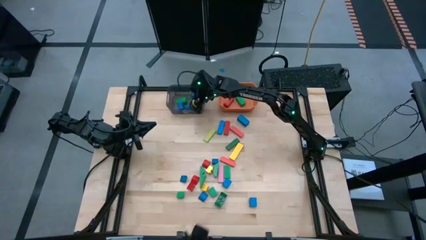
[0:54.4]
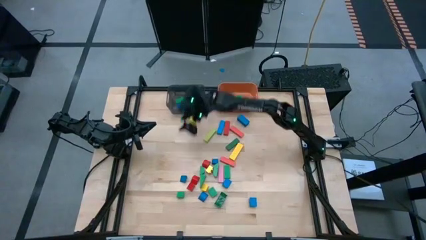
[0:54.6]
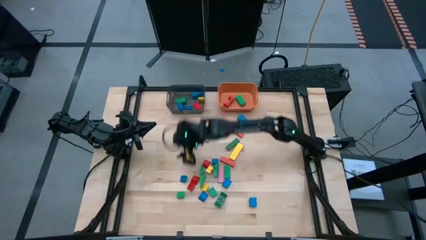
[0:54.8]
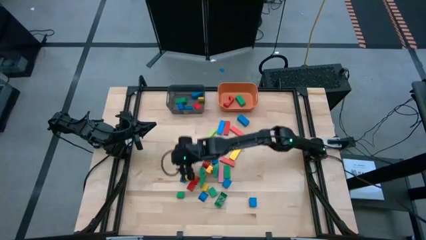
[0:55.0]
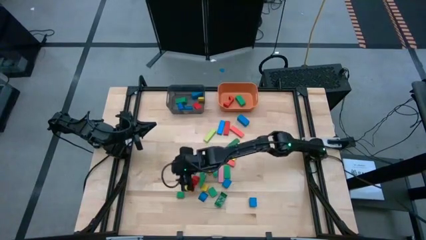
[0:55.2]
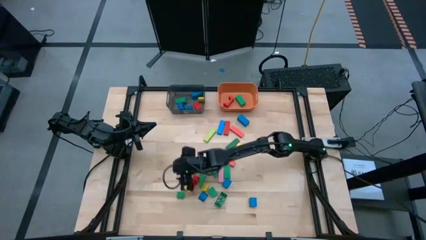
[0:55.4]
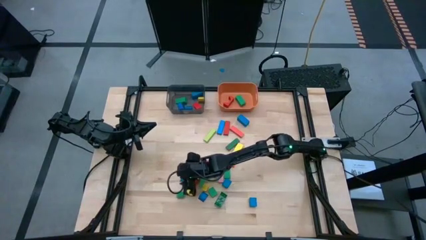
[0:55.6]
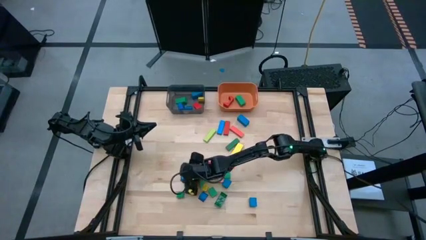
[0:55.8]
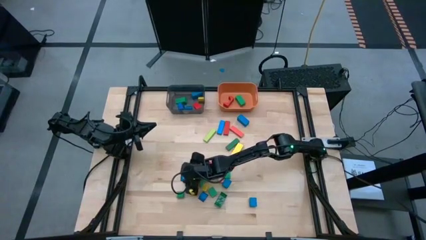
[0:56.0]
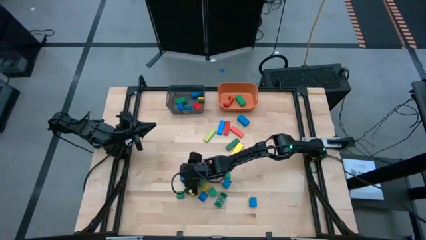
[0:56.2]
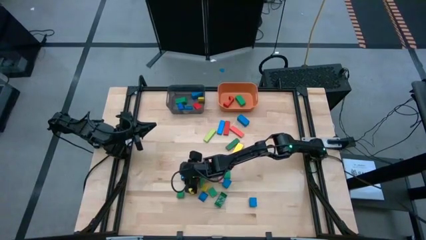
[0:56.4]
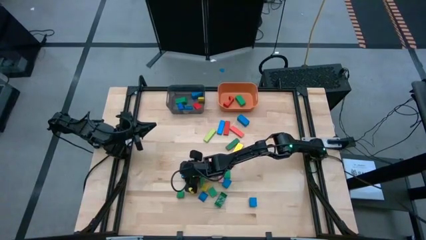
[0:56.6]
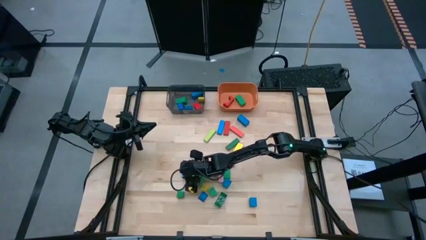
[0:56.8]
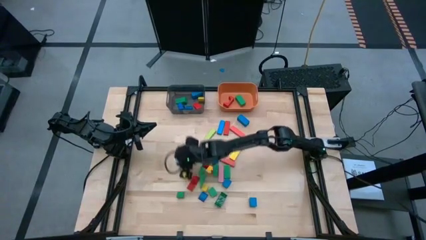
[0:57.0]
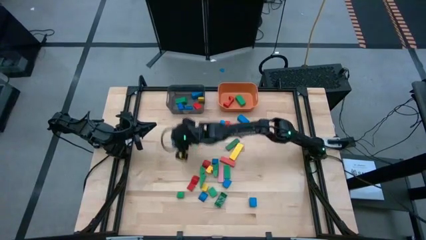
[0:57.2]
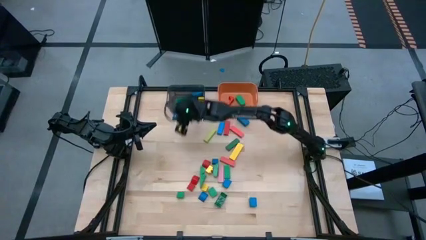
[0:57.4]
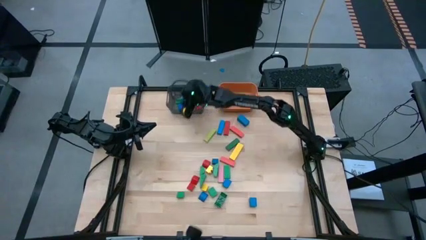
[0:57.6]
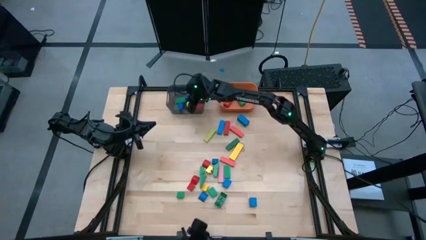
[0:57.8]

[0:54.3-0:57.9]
Task: Sort blocks by size
Put the small blue block into the black bin

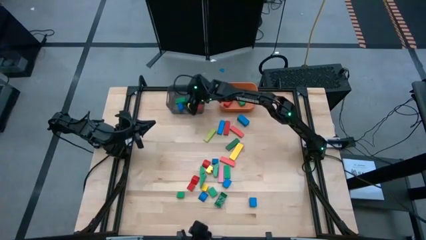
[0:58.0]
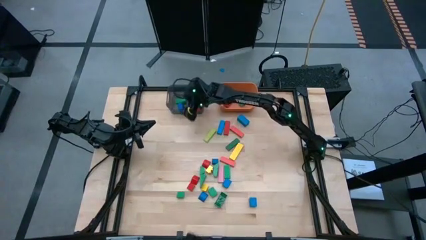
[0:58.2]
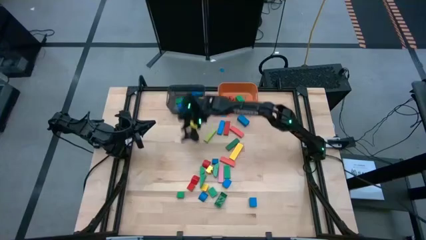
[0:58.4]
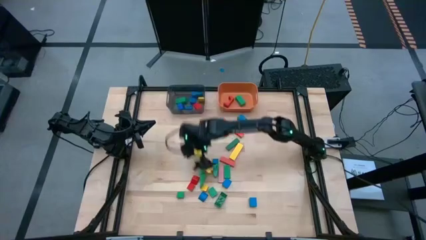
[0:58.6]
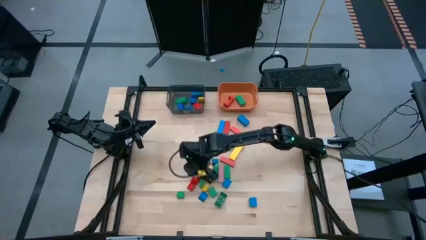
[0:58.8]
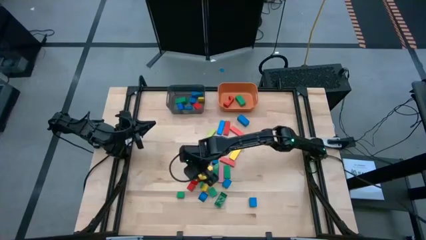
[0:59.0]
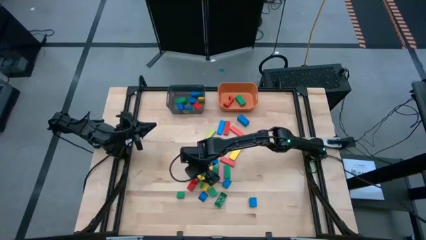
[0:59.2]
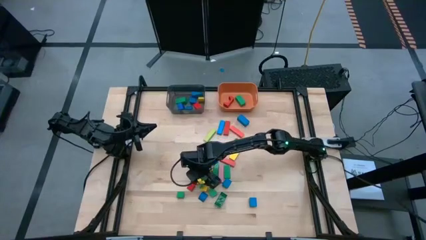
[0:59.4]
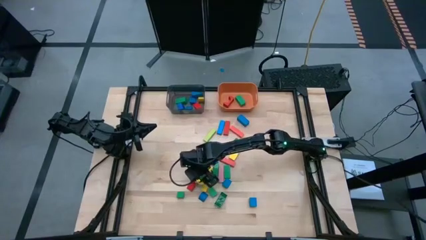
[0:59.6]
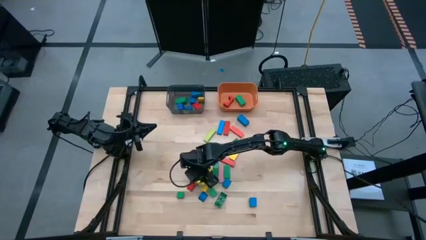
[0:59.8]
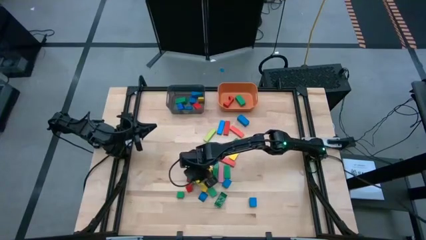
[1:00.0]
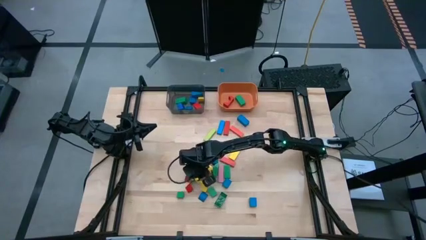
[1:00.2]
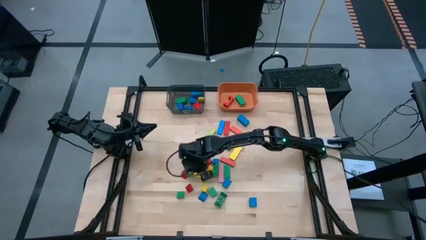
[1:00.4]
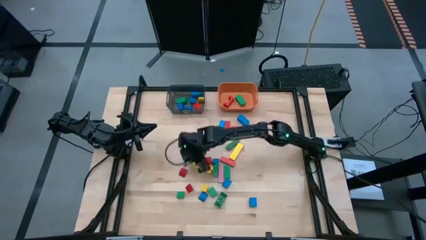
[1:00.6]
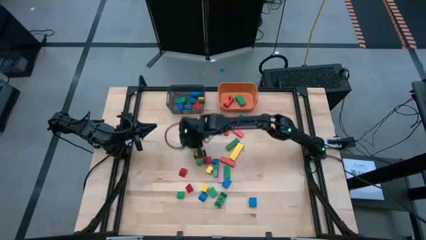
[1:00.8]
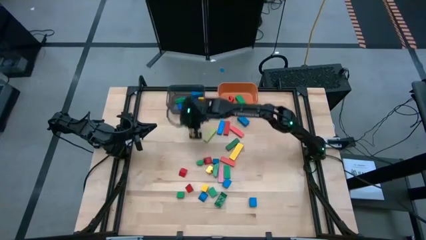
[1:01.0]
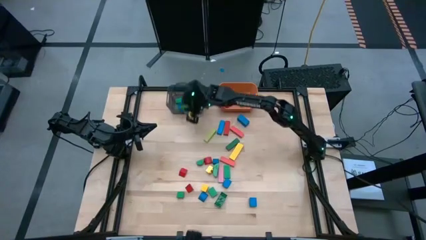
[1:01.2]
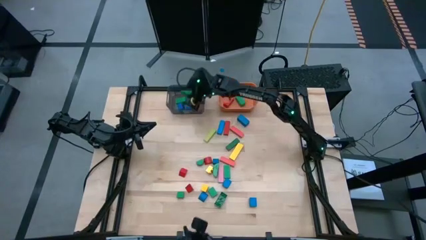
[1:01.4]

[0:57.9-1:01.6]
Put the small green block into the black bin

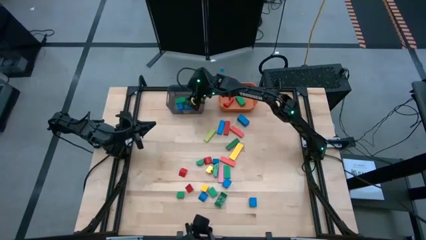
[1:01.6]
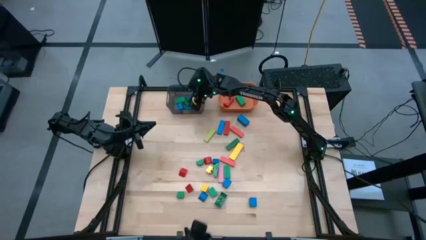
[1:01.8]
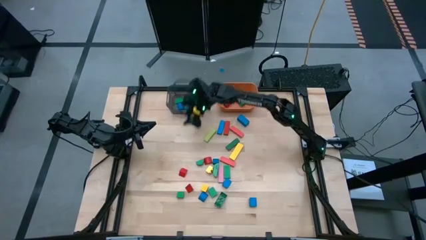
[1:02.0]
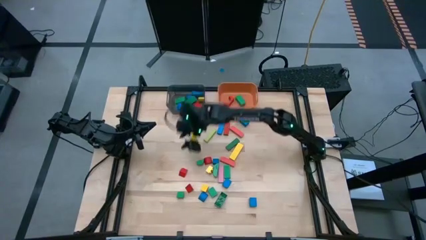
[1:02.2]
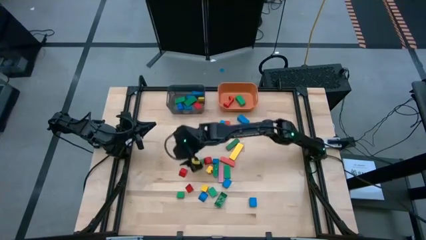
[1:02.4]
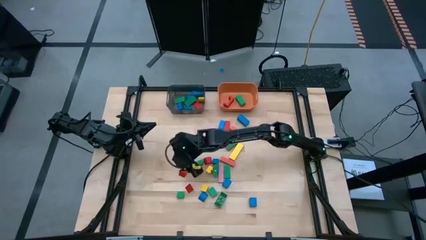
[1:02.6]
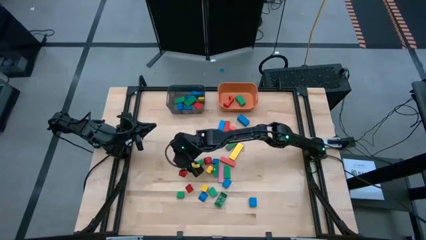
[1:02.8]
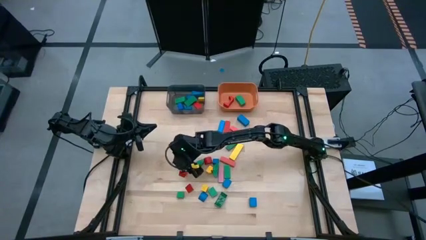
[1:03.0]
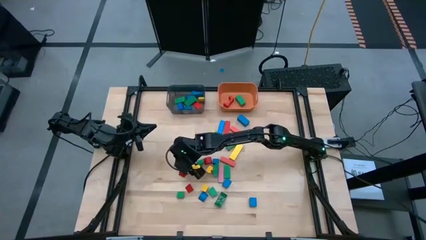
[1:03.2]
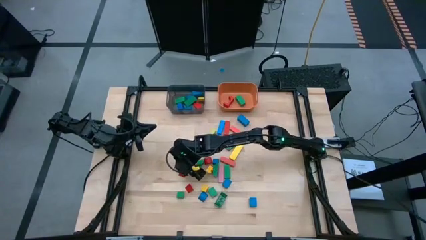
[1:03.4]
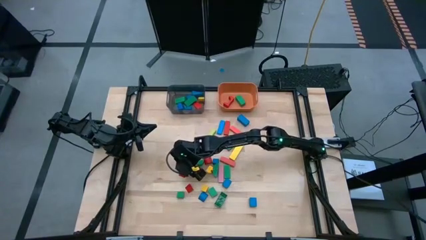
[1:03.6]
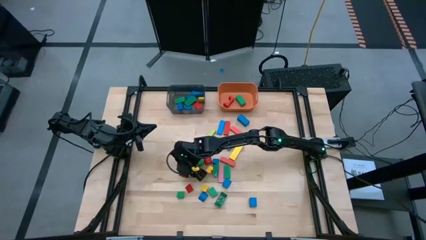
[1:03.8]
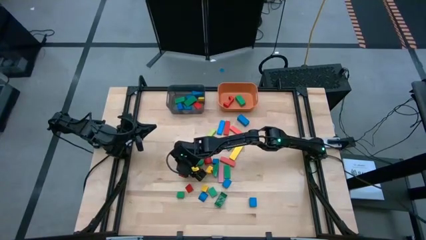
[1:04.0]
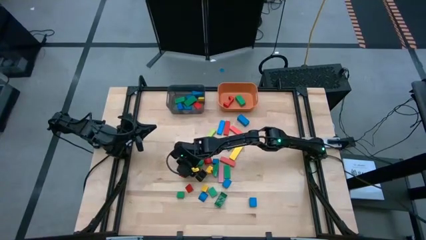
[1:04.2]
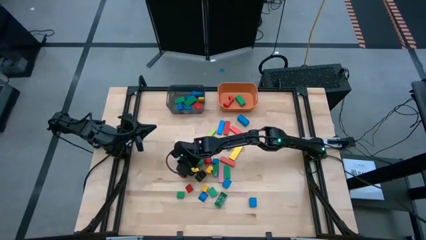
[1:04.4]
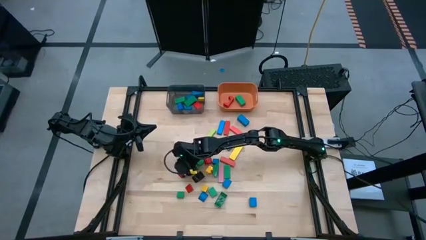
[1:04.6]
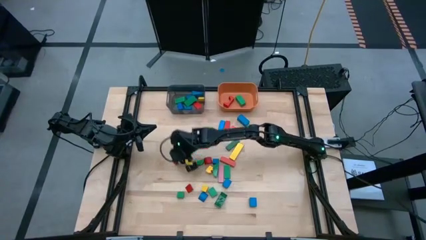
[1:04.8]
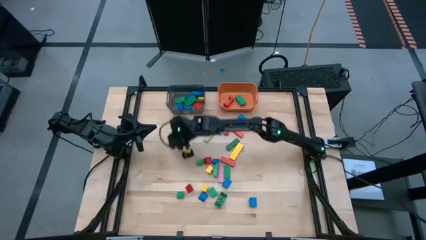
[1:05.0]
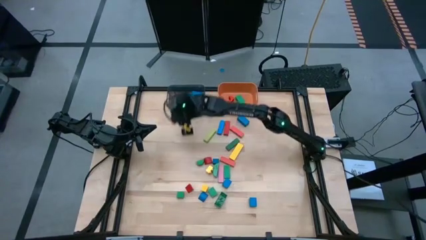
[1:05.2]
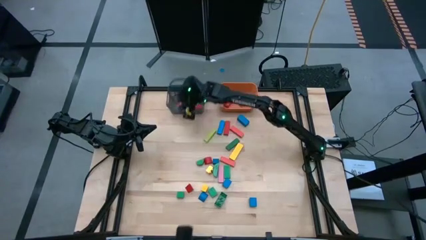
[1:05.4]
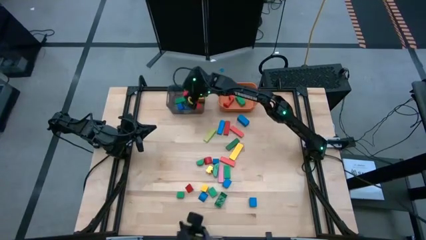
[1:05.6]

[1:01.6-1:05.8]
Put the small red block into the black bin

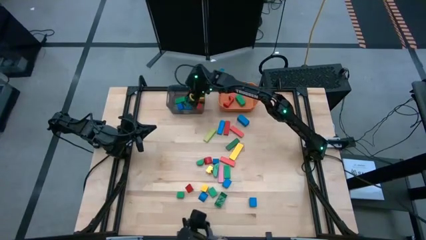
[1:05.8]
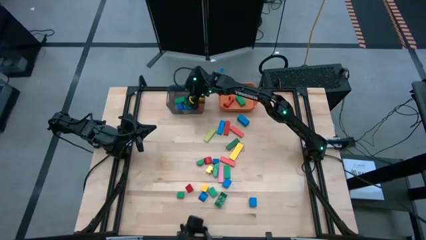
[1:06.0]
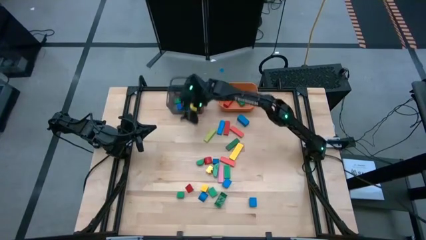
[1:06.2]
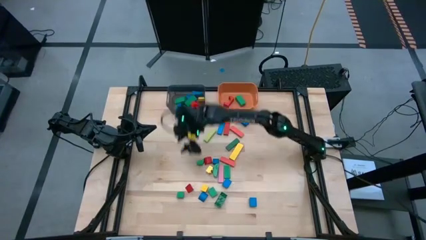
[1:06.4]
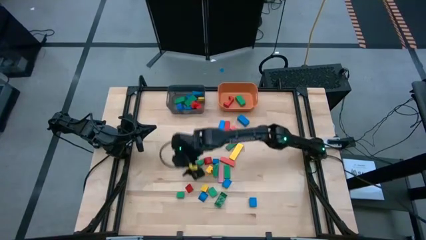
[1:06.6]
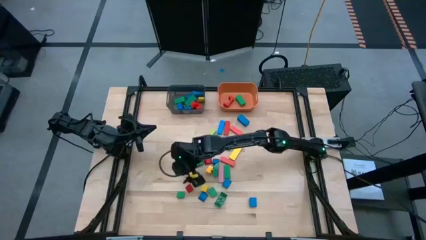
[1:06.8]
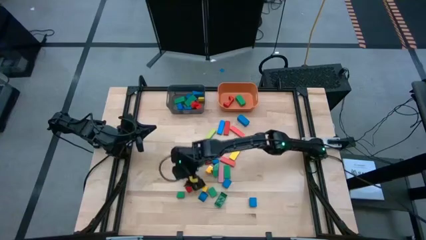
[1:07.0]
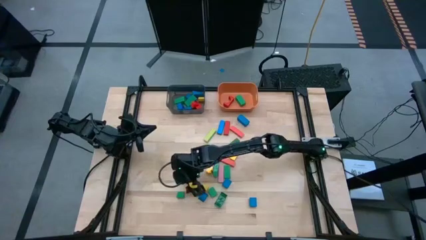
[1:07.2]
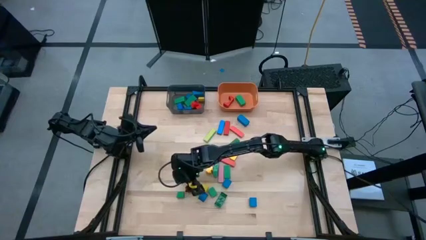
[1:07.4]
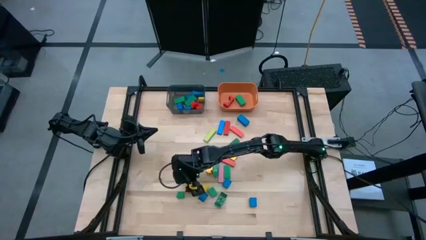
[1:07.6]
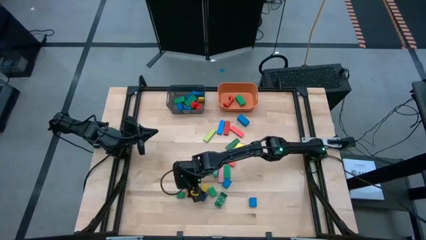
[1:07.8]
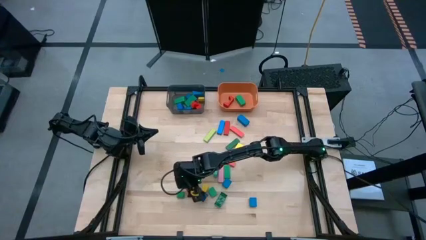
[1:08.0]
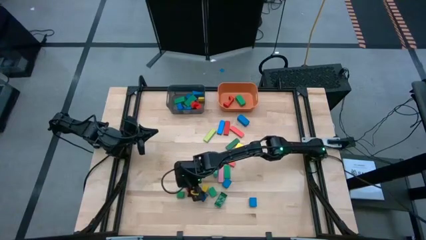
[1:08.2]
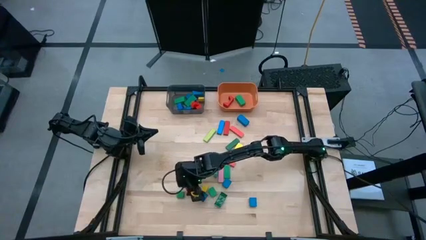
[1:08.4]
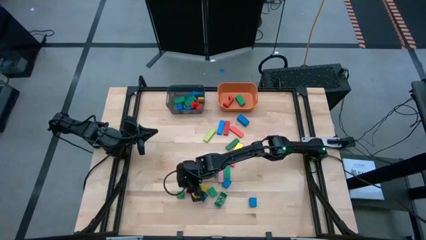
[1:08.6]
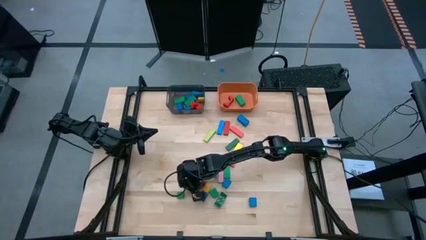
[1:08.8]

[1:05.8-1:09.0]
Put the small red block into the black bin

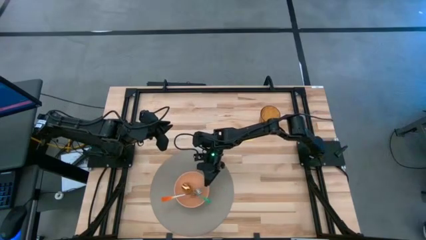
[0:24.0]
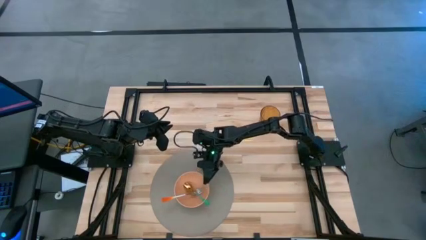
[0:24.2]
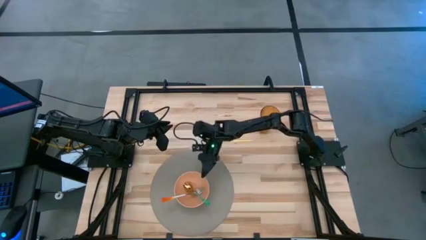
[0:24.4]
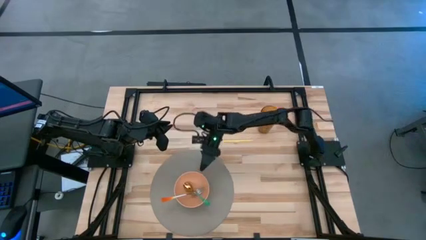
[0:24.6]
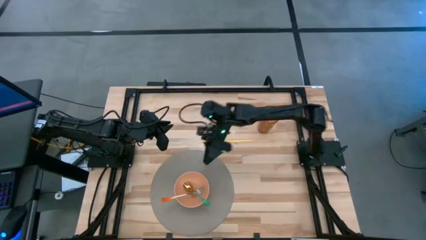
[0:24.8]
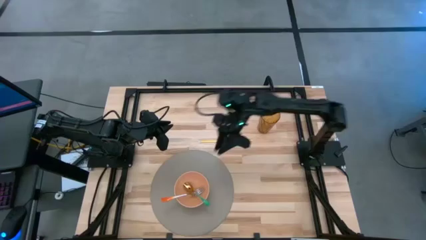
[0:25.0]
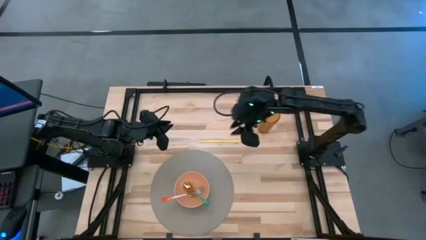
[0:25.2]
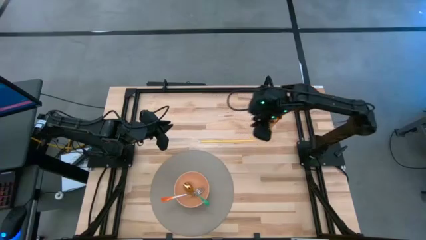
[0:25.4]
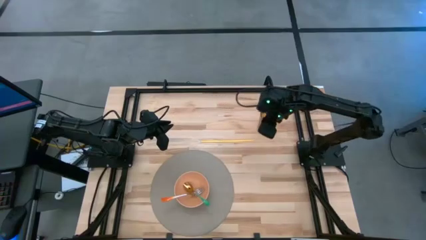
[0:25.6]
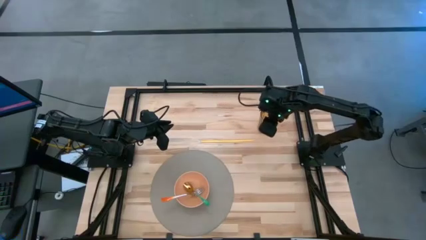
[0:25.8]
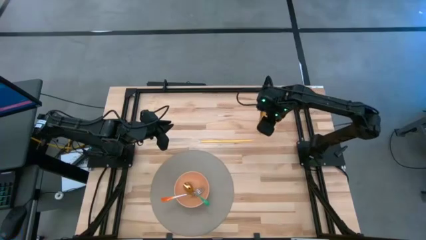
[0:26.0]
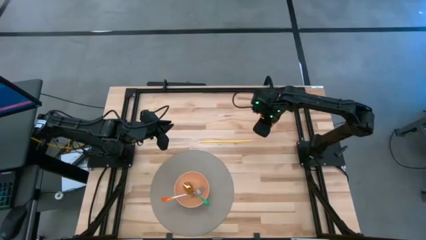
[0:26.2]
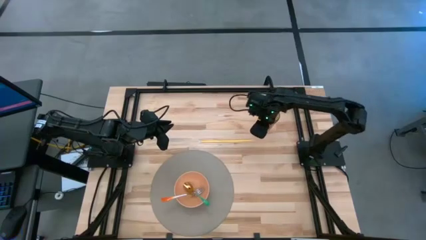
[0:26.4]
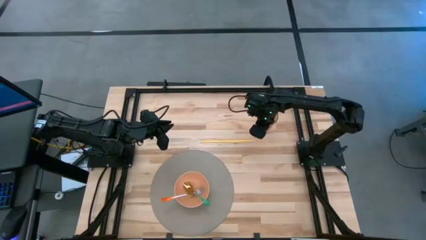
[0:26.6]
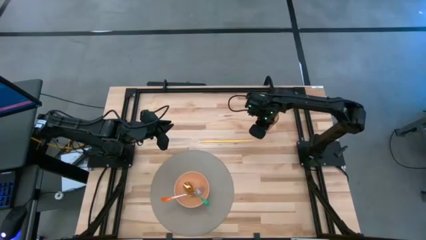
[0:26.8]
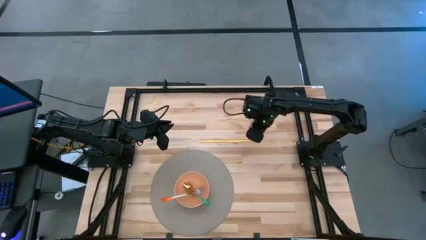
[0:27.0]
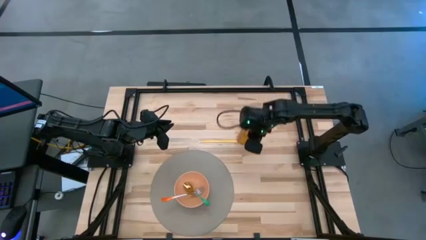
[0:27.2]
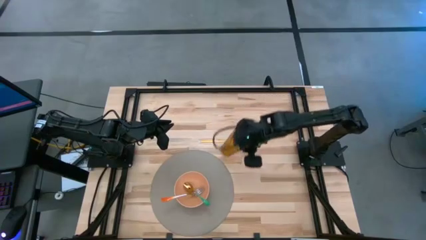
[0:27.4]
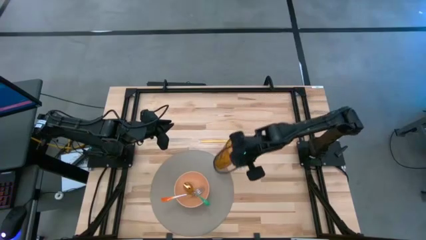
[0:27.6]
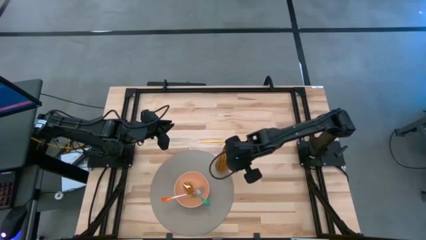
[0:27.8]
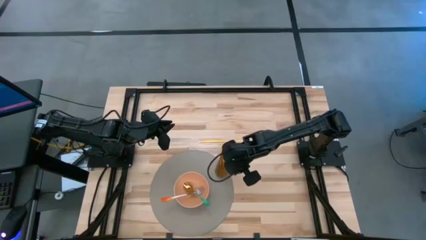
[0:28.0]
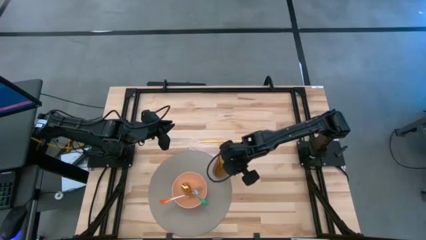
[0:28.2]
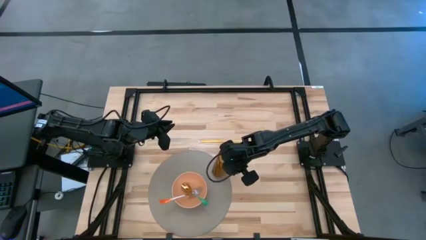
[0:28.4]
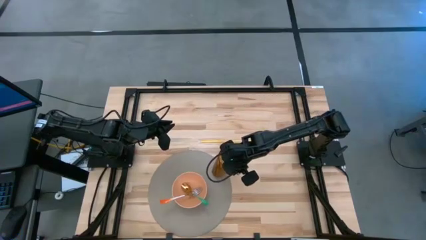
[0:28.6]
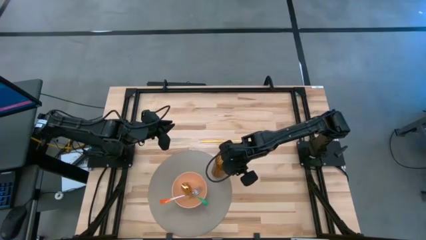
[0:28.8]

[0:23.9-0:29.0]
Task: Pick & Place Utensil
Put the brown cup on the gray mat
